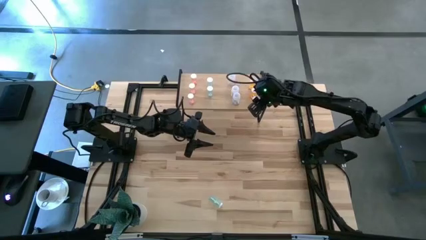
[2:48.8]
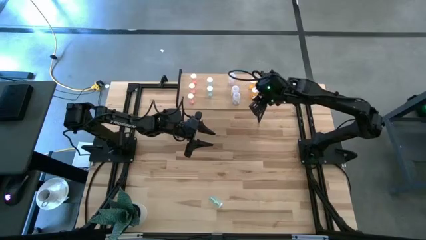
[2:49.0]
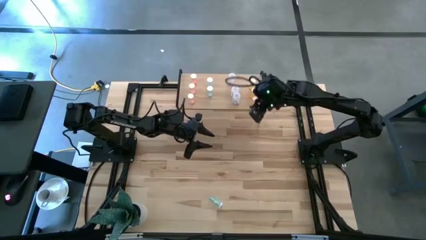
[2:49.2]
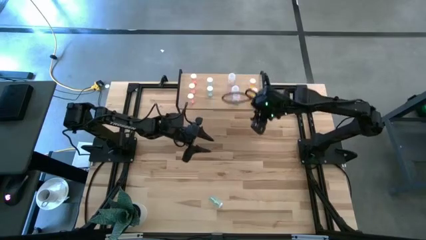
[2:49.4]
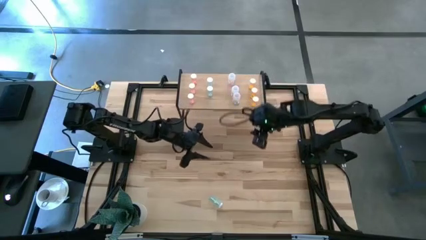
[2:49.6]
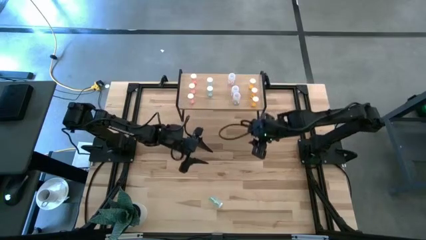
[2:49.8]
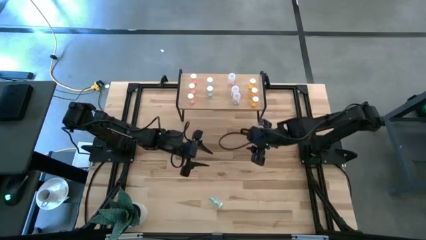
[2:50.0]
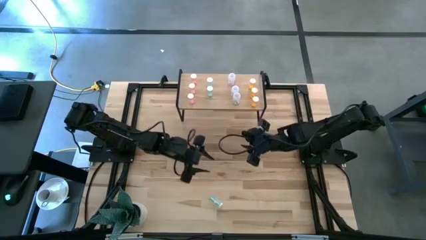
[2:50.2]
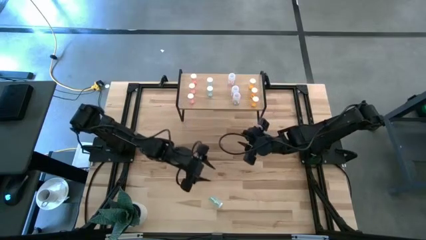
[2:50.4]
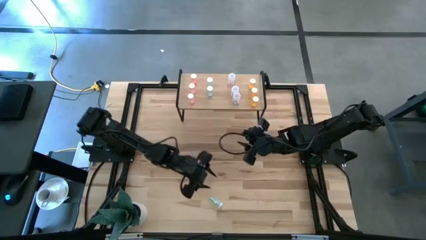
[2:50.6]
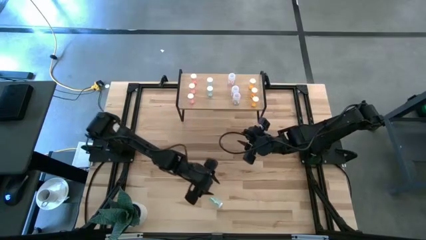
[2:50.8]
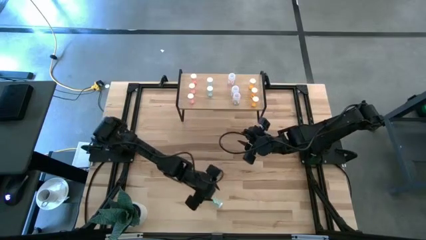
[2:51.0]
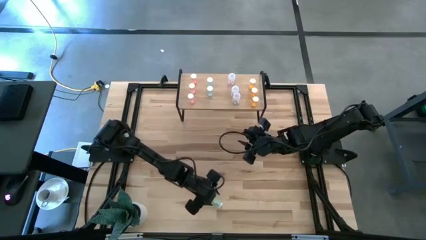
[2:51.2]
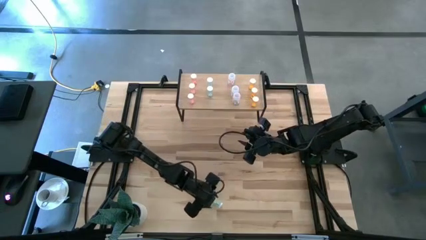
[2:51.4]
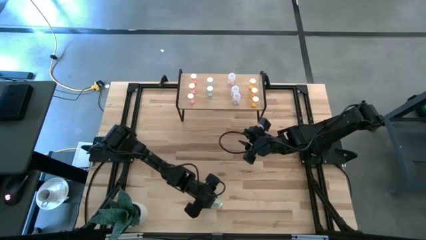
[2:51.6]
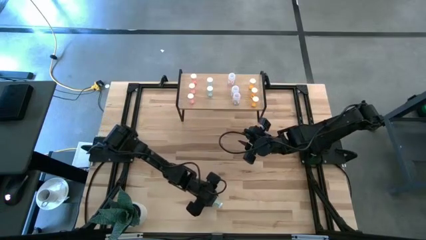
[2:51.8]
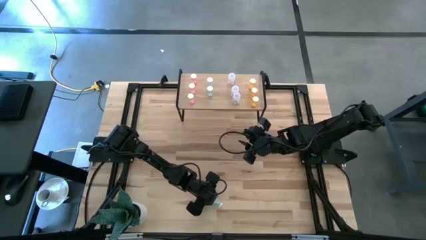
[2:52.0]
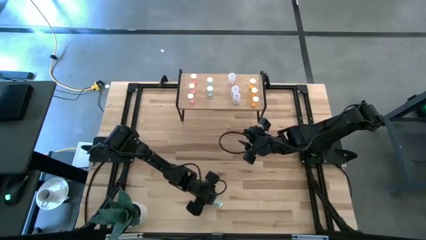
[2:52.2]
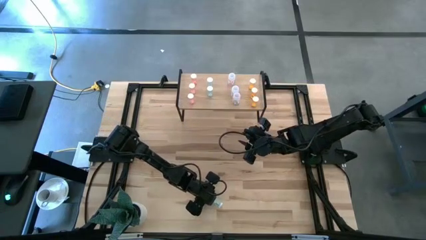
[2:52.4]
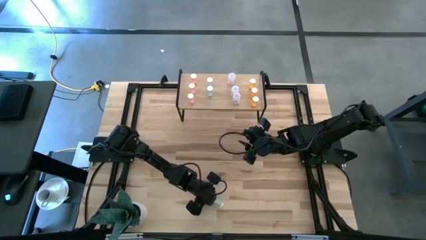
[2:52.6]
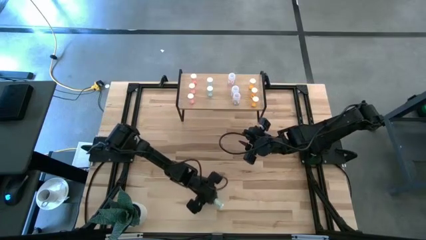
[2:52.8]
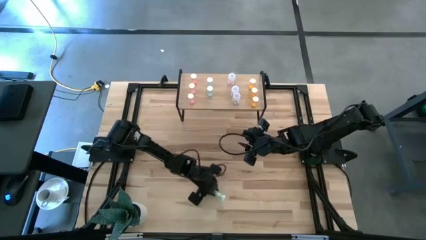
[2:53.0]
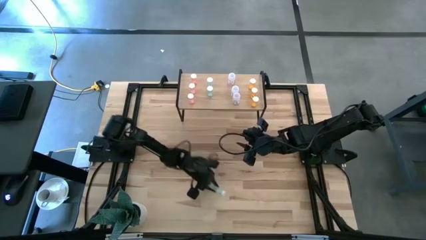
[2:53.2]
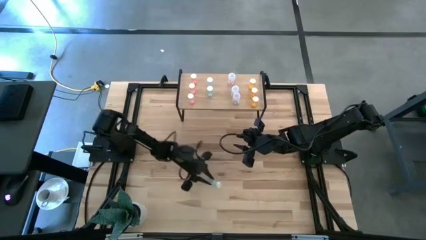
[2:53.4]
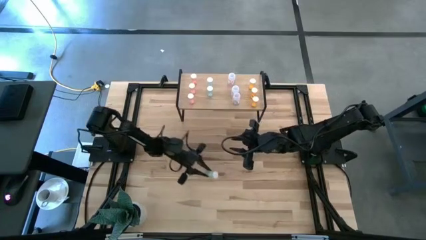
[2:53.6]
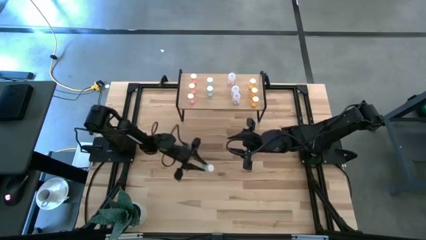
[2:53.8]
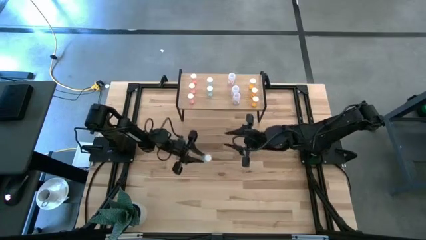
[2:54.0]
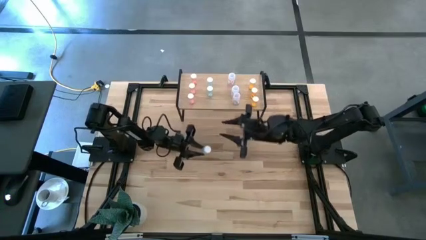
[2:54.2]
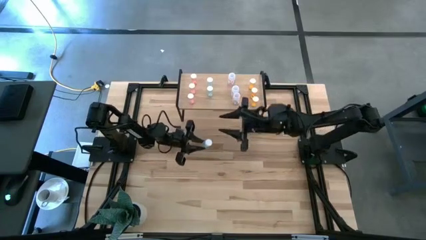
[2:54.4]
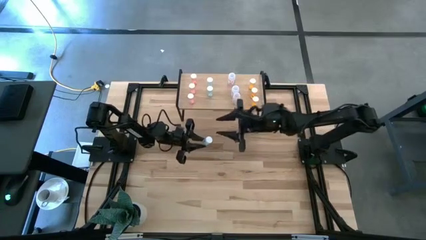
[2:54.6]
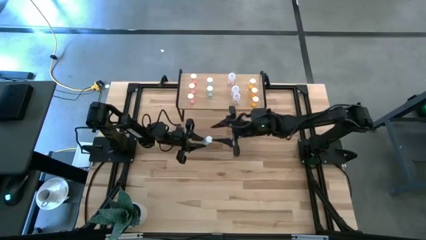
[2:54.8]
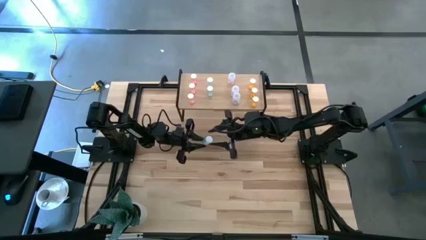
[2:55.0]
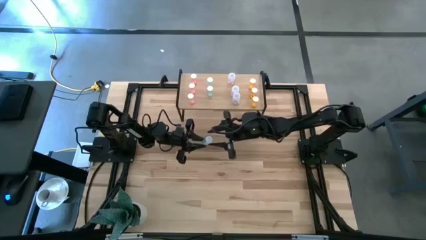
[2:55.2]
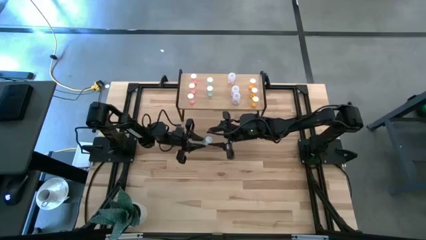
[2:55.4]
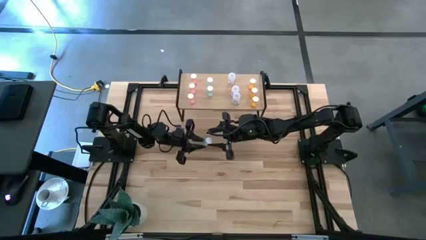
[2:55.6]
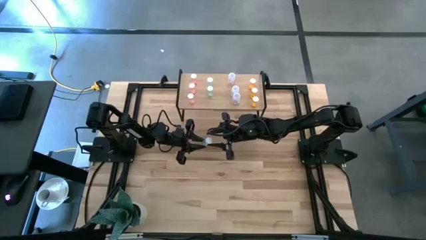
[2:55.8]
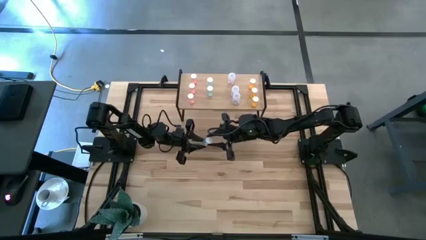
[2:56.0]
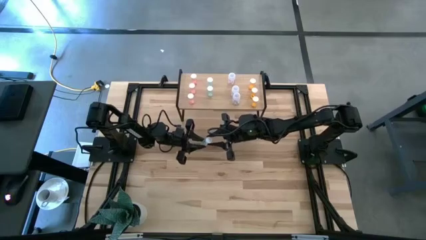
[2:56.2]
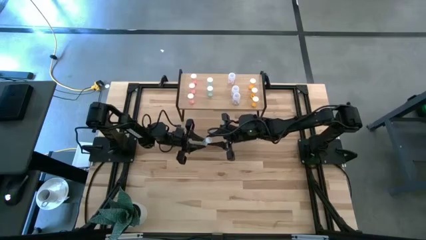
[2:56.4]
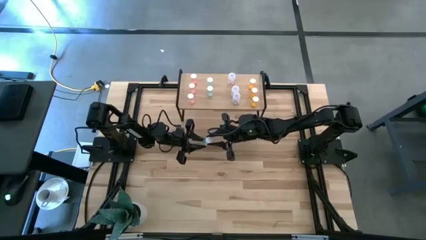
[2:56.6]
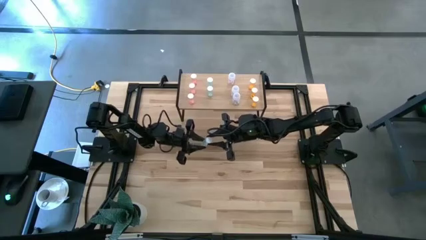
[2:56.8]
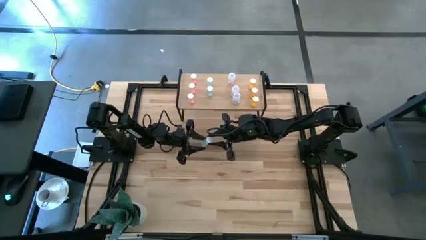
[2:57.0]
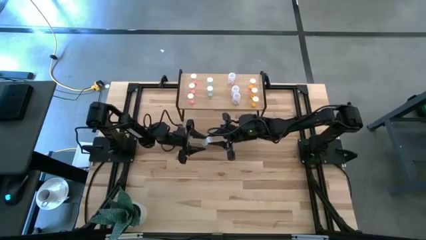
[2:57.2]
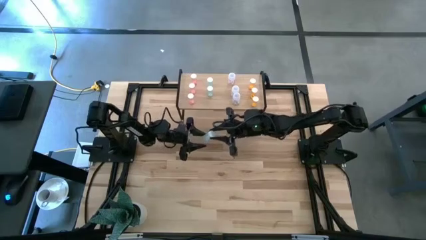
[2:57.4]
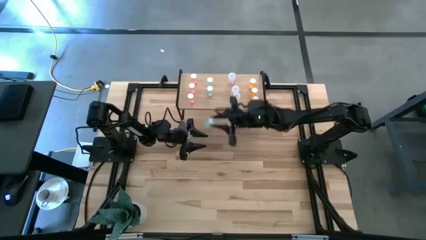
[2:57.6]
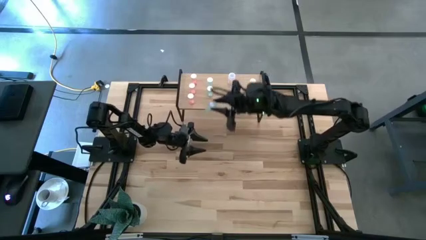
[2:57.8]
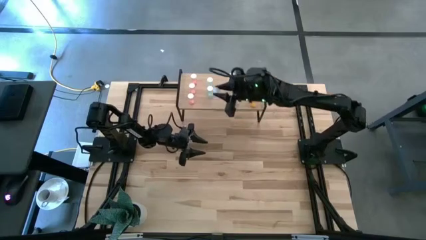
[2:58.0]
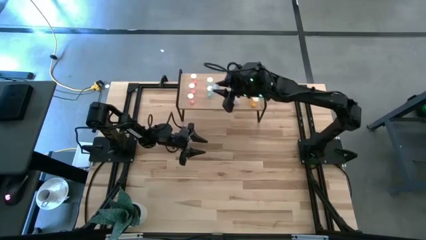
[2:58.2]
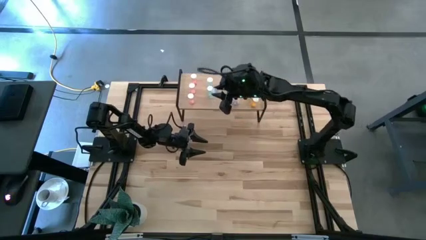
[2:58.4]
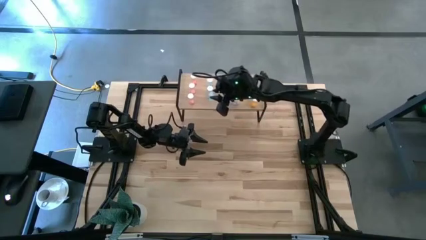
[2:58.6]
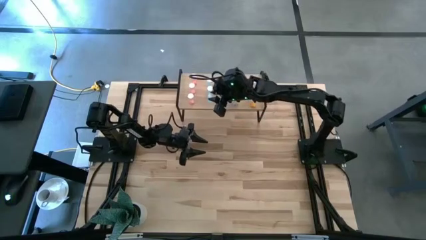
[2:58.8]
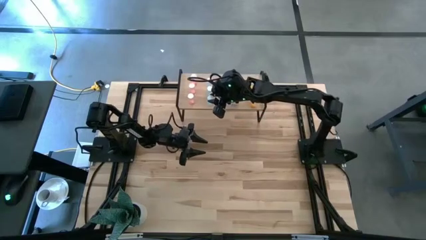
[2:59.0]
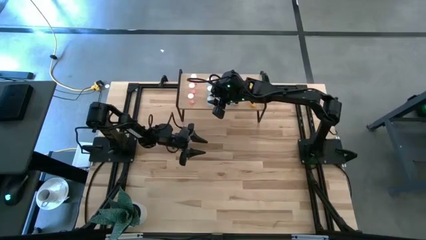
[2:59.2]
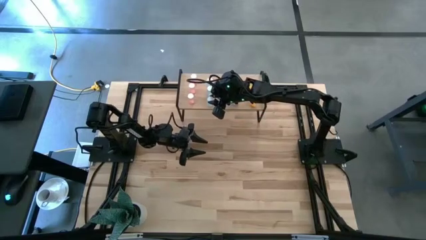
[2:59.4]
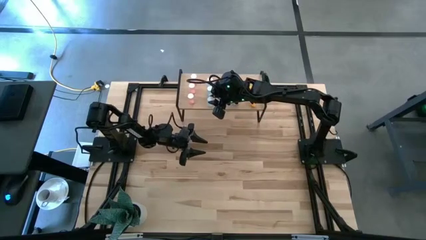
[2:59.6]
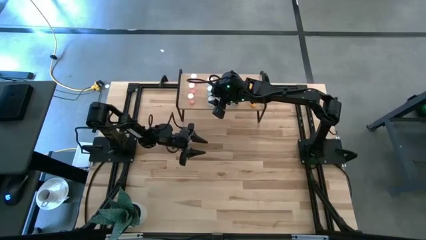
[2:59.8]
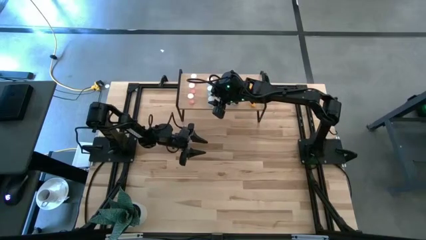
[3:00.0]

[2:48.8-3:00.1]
Task: Pick and place medicine bottles onto shelf by color
Put the green pill bottle on the shelf aligned with the other green pill bottles

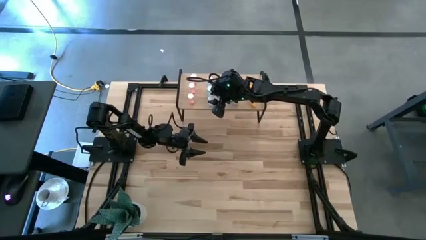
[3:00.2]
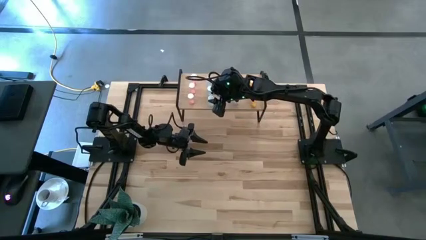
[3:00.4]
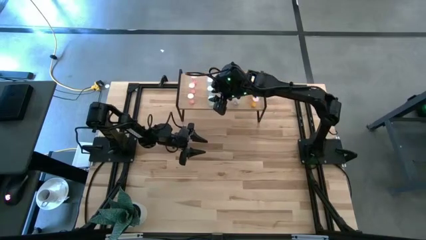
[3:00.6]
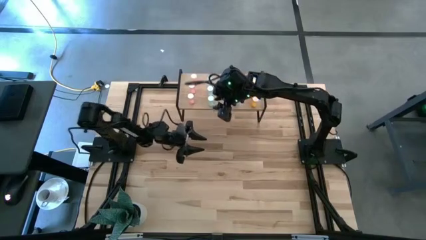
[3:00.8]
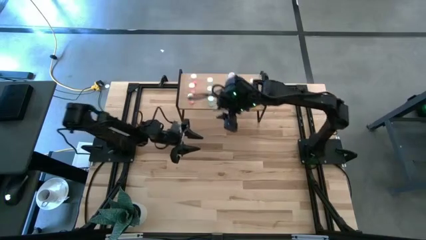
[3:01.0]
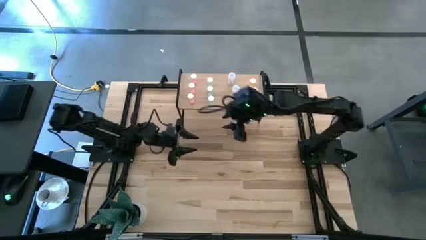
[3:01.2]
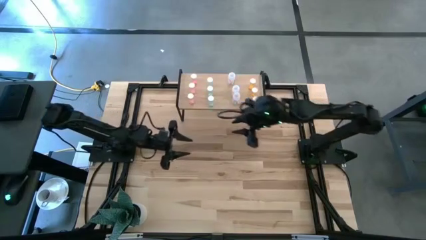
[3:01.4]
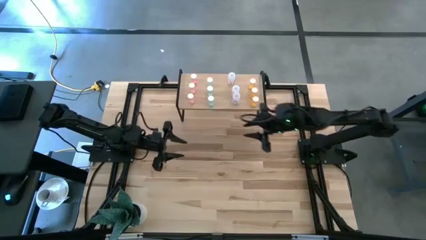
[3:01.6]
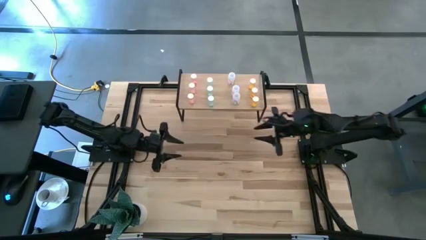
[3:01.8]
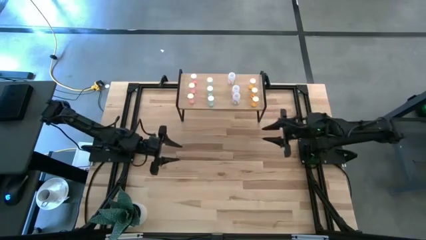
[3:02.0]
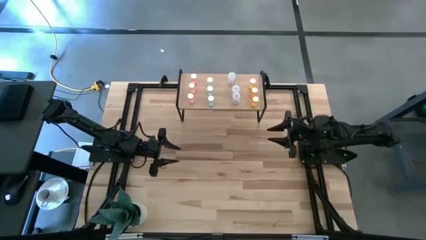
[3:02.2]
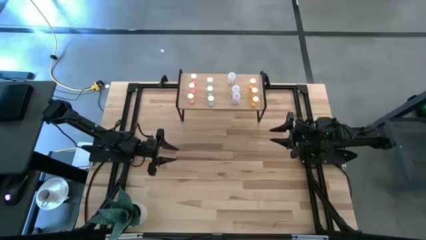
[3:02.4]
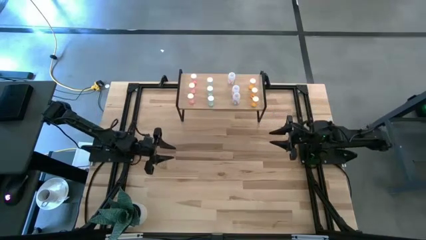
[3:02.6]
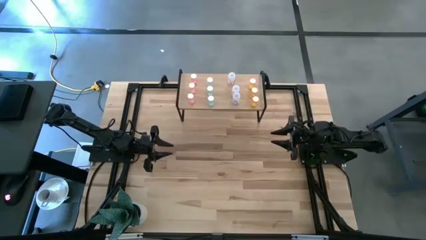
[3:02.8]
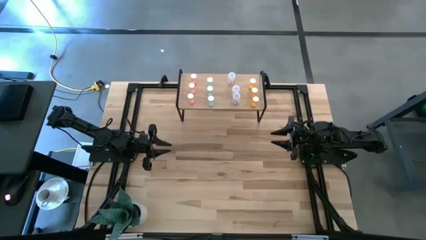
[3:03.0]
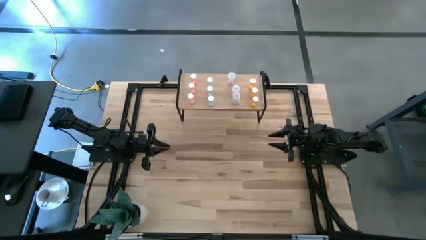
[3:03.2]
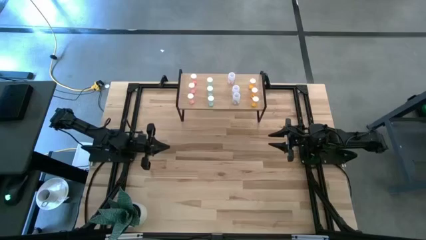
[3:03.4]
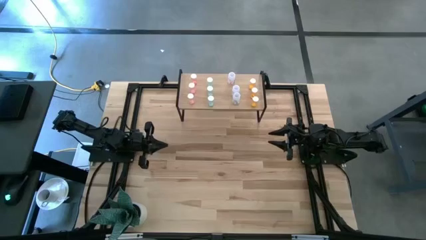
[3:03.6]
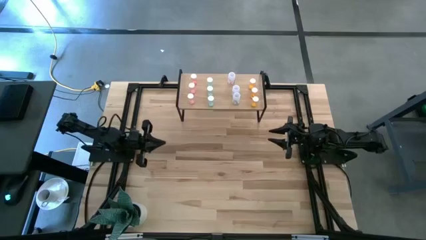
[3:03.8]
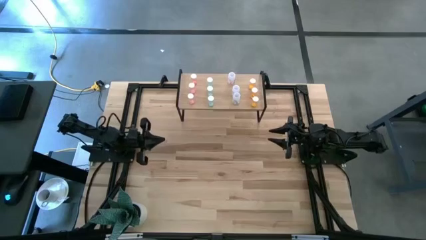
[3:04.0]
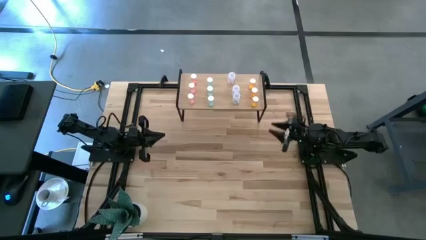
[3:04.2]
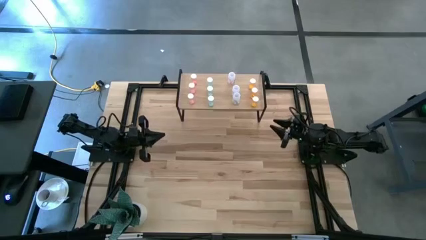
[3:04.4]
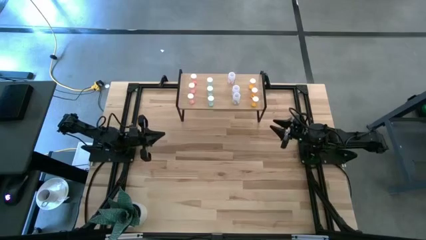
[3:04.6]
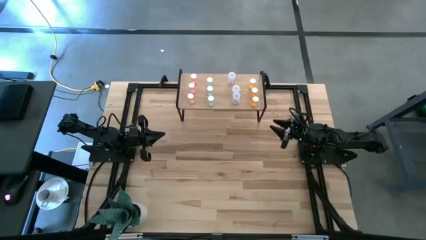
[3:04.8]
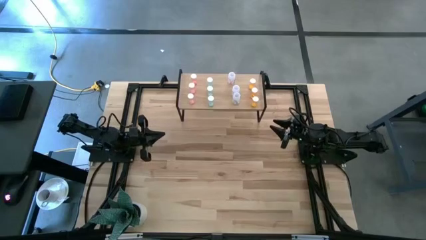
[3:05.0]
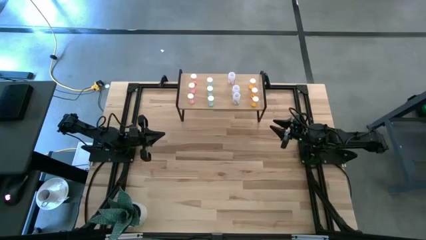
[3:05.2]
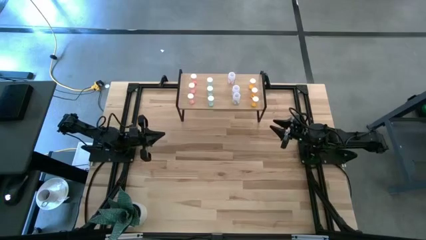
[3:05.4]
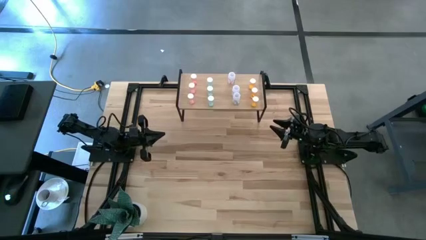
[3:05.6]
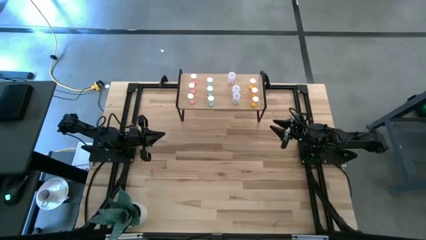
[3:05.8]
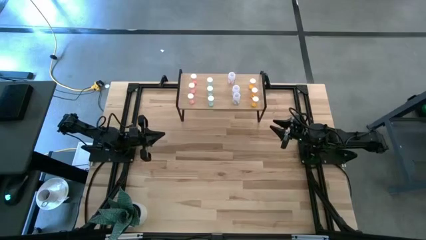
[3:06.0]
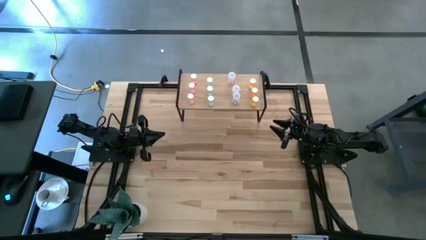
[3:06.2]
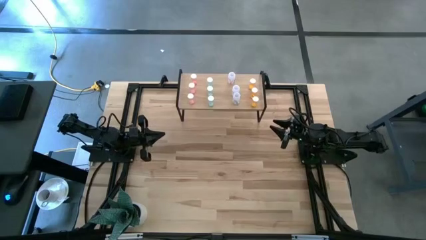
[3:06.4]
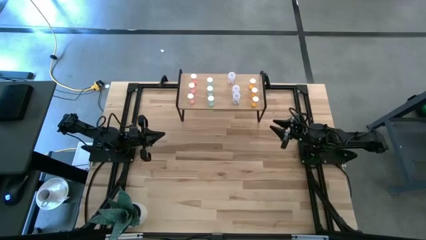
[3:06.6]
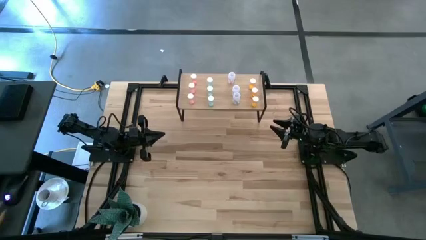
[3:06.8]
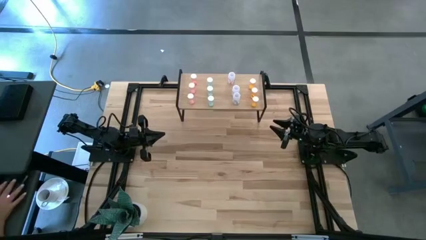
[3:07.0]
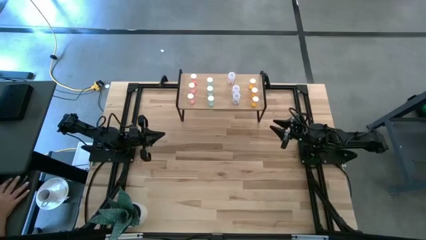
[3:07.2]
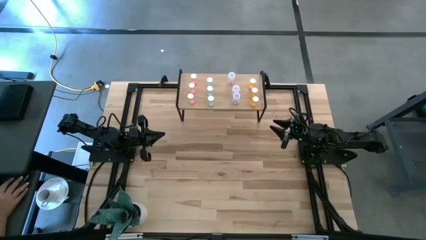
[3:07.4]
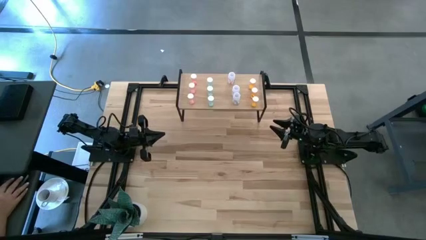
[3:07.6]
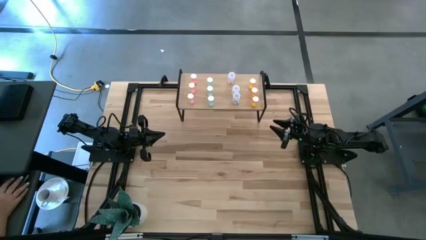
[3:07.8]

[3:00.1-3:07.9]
Return to Home Position
